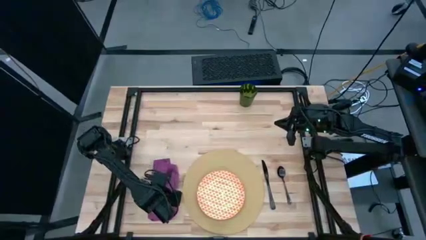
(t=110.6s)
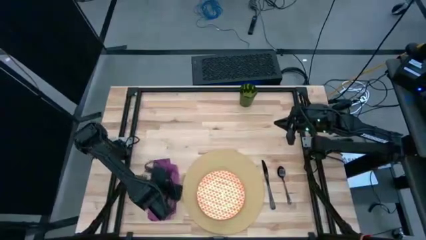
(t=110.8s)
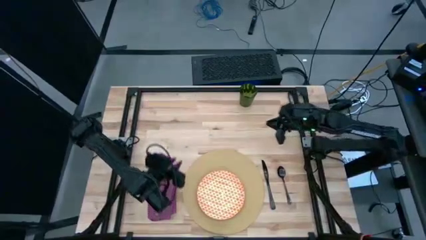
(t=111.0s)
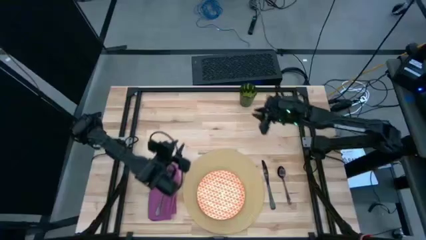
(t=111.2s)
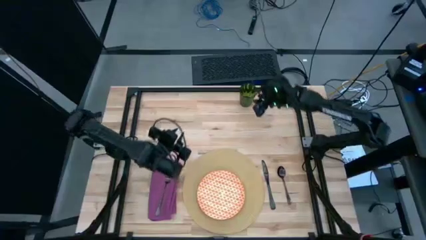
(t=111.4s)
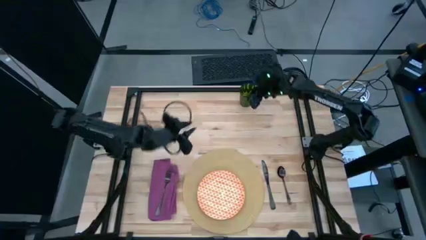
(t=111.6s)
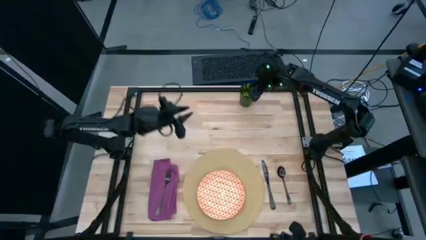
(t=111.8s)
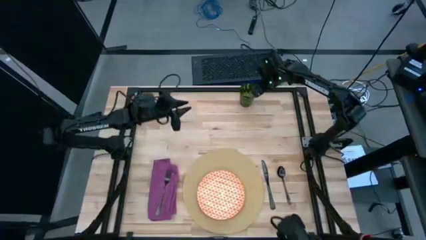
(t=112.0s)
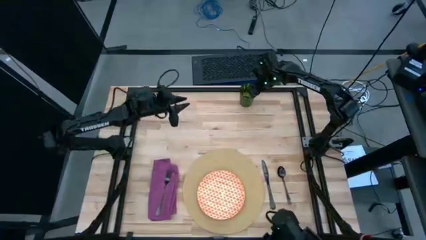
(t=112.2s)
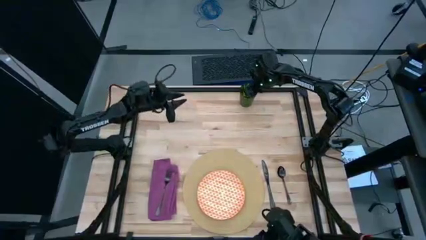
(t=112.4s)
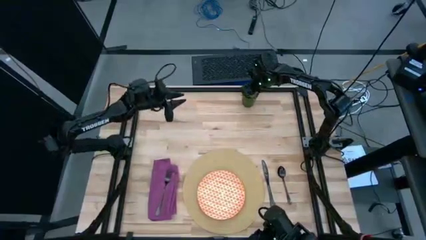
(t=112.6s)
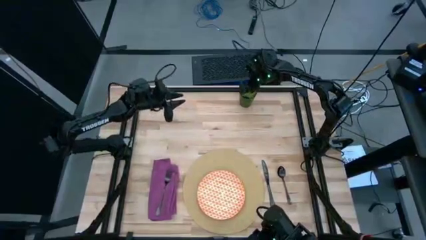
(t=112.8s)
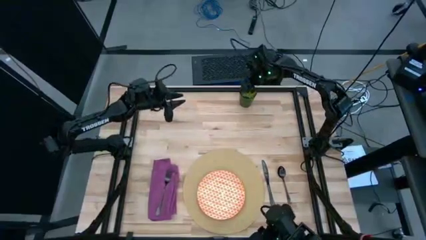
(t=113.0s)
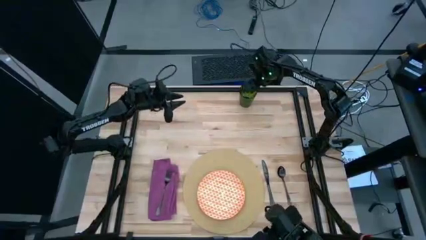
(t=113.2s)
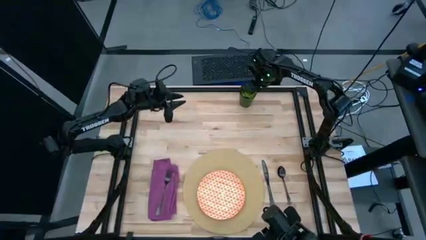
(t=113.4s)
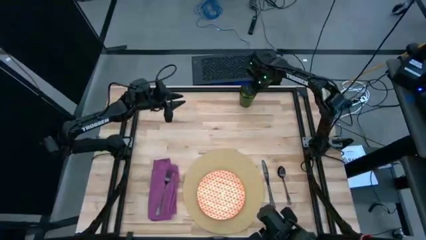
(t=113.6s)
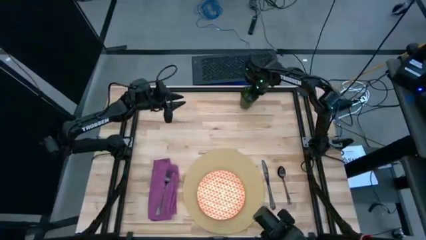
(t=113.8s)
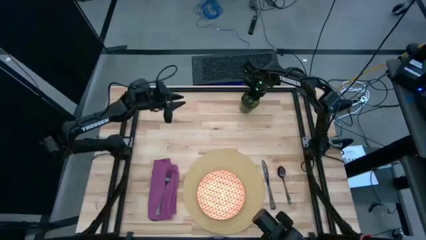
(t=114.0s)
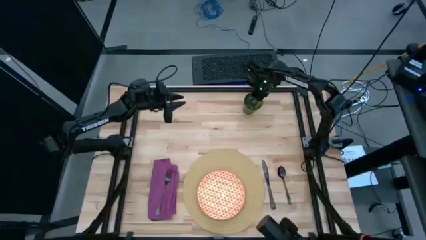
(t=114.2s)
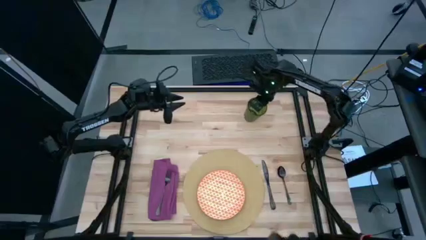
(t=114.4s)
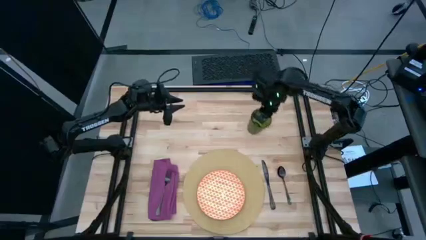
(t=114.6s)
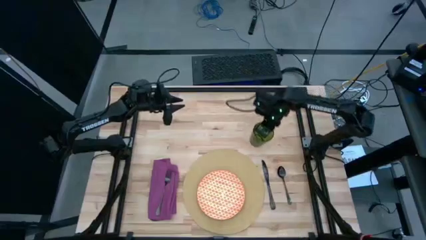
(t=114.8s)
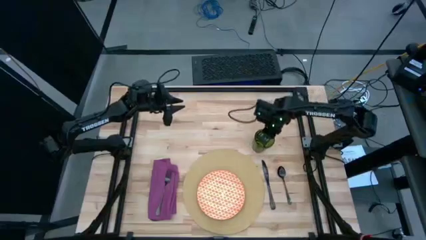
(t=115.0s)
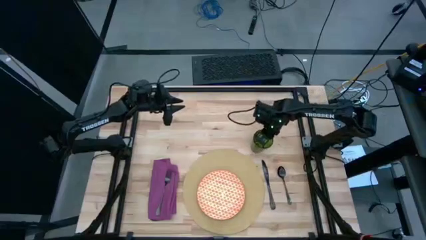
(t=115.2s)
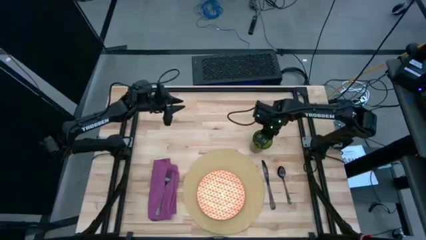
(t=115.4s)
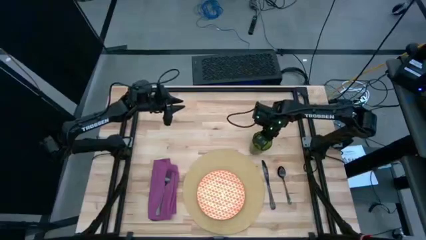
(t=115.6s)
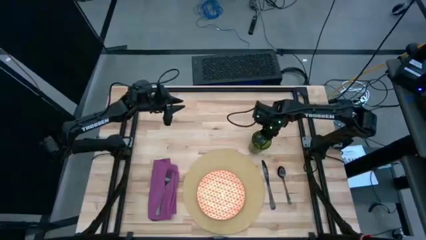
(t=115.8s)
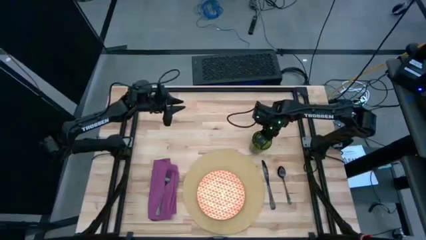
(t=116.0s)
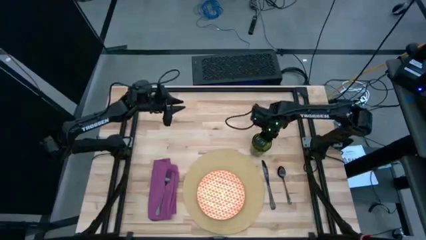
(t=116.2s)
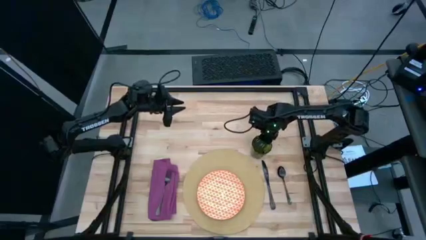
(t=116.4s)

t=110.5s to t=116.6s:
Task: Set table place
Move the green cup to the top right of the brown table mat

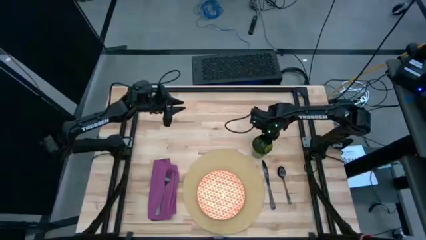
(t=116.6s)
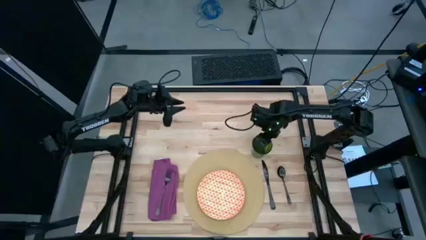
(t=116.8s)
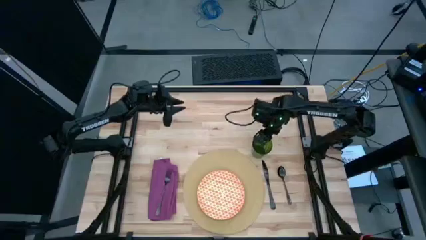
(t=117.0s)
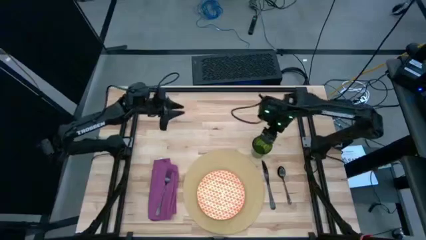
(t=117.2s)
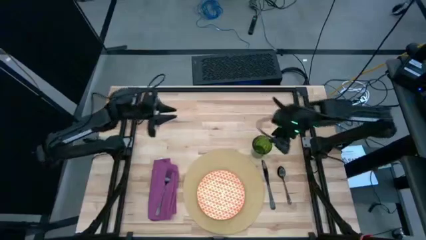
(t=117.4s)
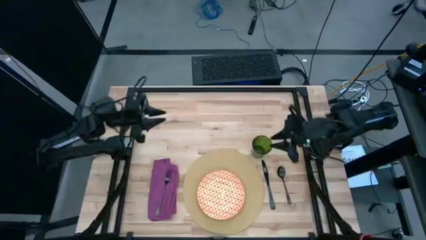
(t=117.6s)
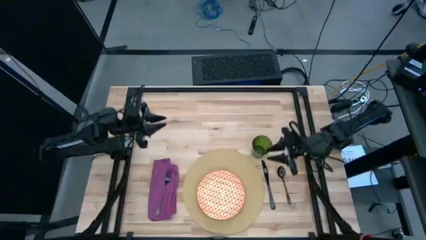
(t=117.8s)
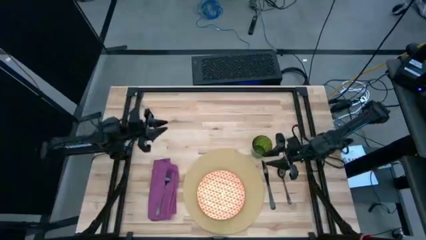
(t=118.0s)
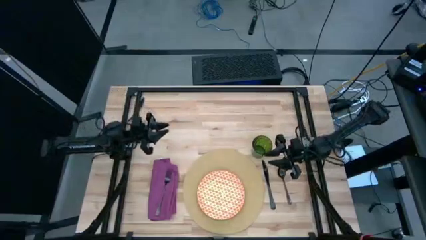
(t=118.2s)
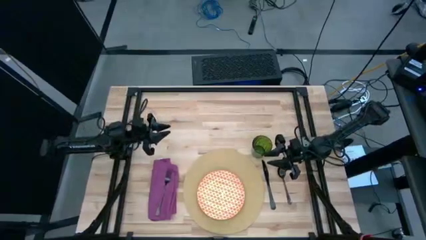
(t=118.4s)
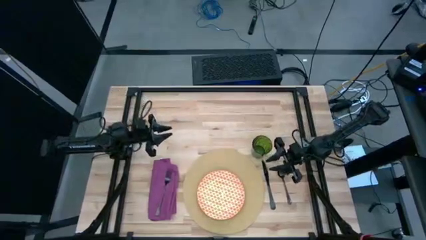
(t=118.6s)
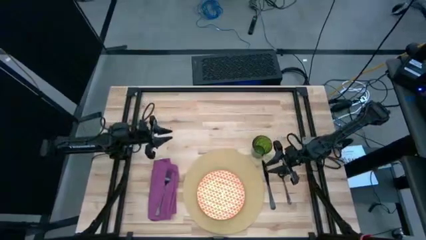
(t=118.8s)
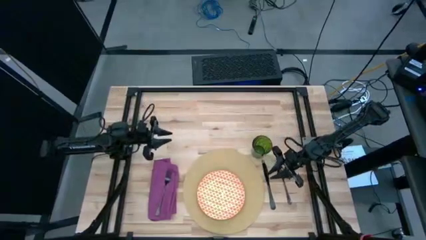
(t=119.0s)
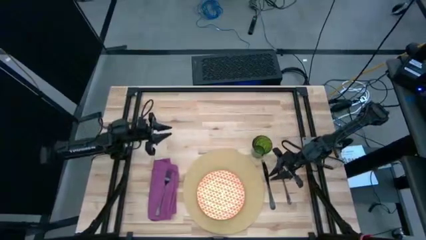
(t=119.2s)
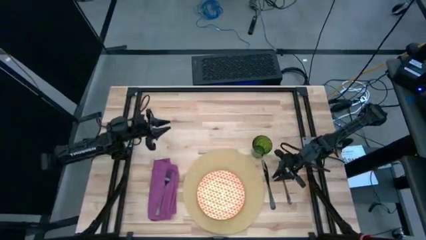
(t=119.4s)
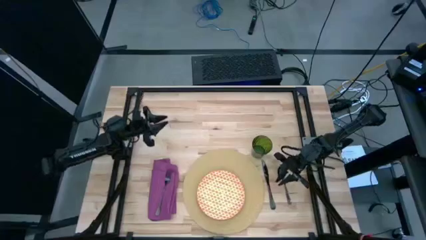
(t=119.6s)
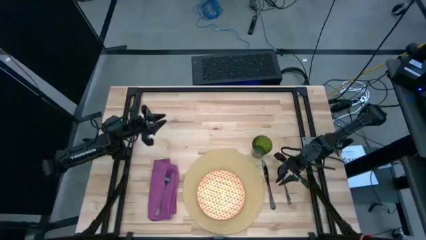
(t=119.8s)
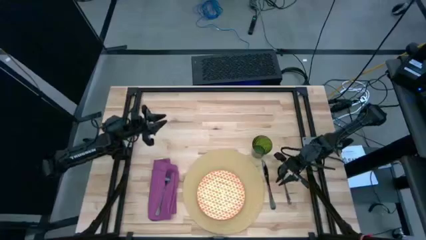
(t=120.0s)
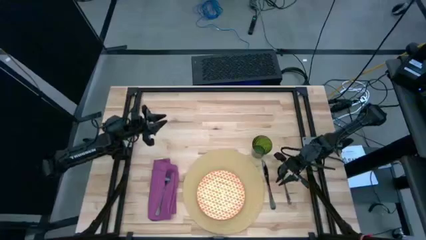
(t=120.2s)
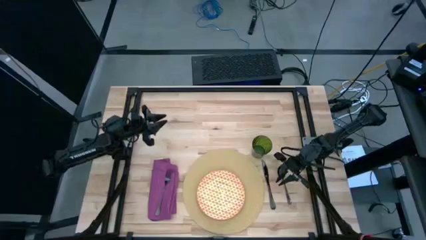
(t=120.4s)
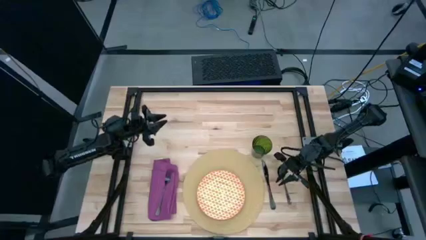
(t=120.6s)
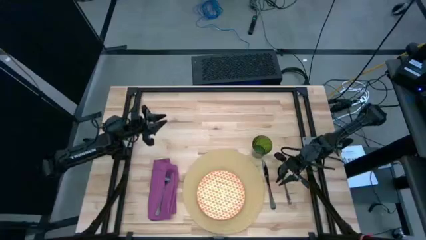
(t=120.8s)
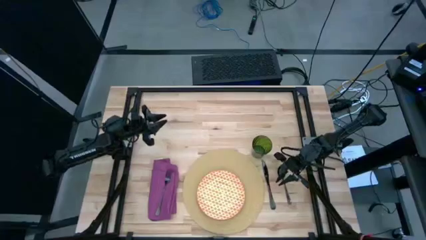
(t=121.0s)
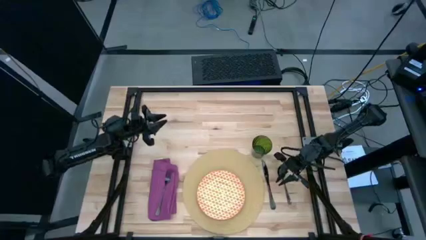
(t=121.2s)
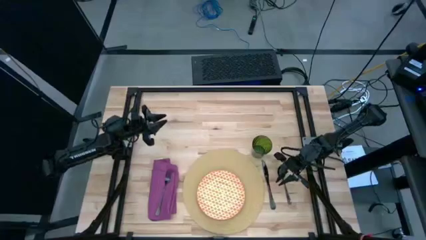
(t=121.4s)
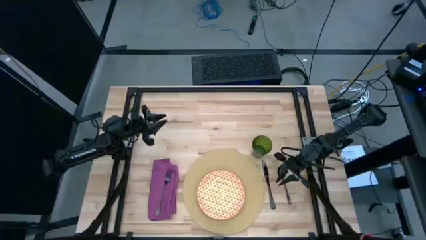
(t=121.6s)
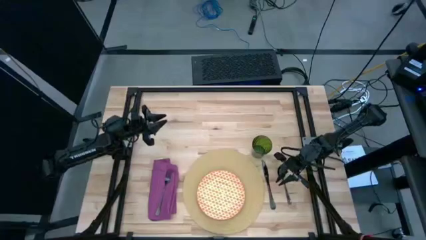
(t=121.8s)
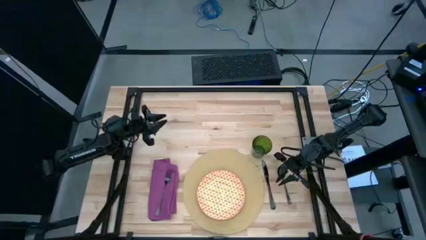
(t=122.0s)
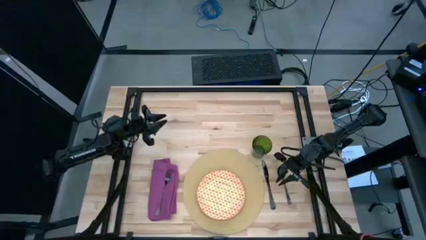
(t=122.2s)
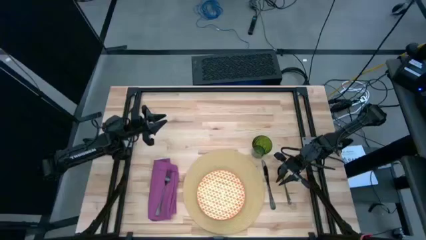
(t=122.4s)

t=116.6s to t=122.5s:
Return to Home Position

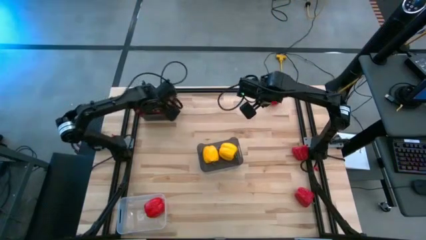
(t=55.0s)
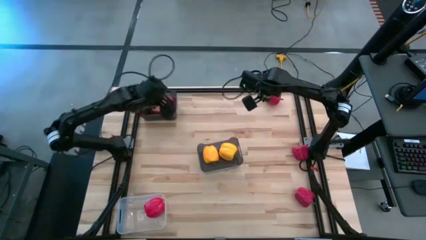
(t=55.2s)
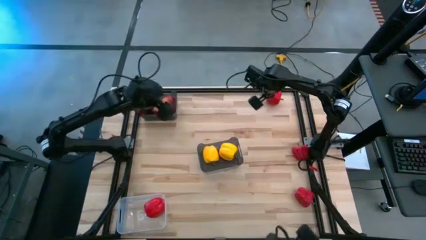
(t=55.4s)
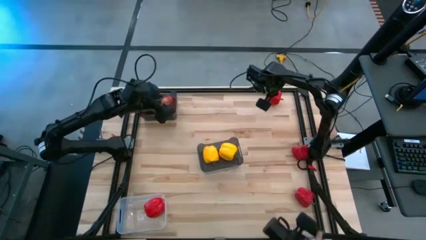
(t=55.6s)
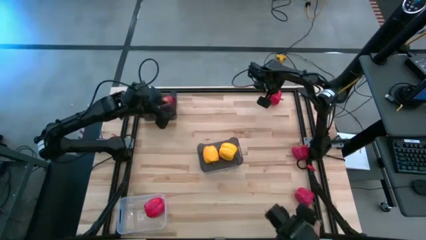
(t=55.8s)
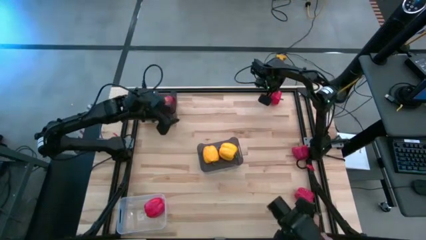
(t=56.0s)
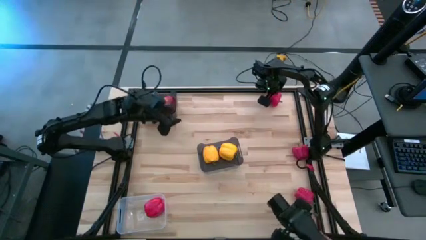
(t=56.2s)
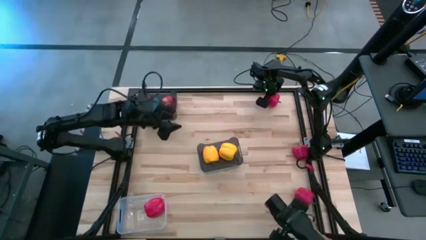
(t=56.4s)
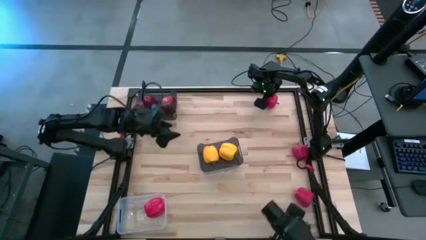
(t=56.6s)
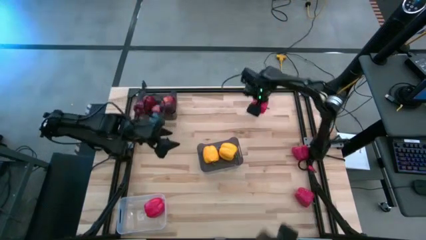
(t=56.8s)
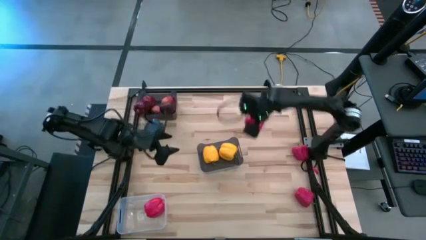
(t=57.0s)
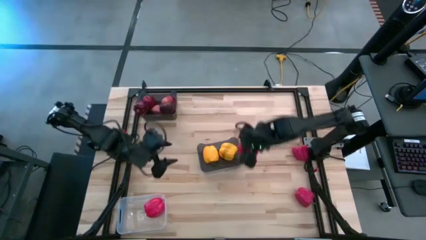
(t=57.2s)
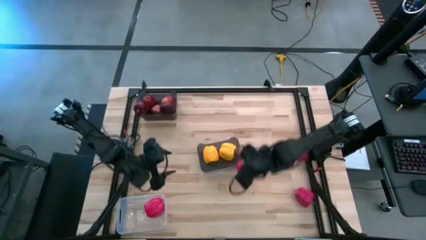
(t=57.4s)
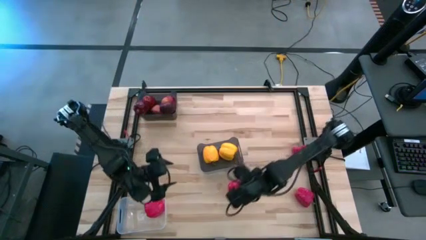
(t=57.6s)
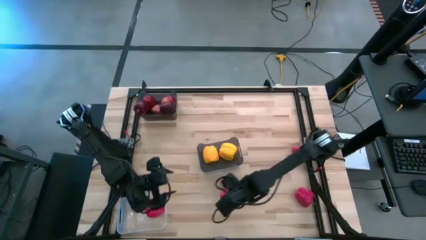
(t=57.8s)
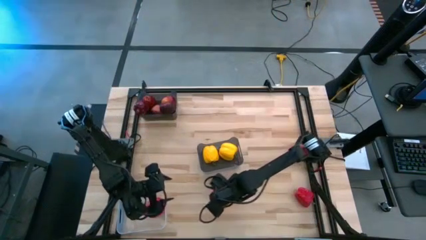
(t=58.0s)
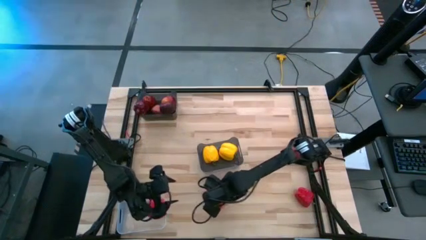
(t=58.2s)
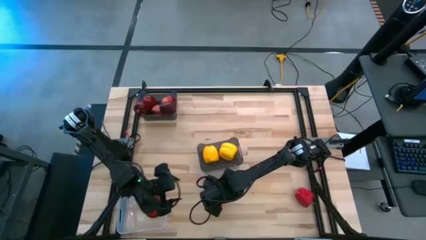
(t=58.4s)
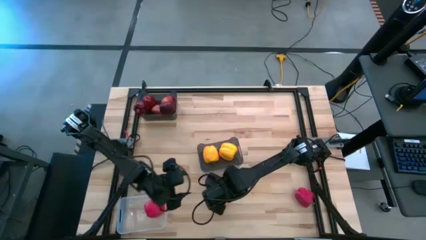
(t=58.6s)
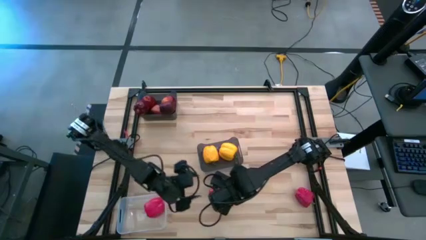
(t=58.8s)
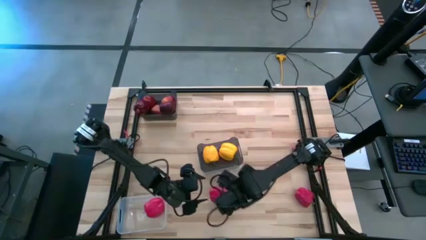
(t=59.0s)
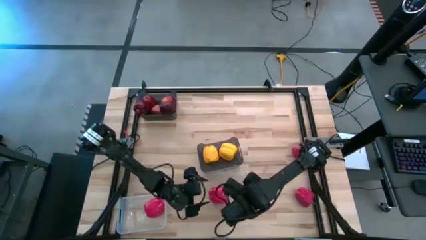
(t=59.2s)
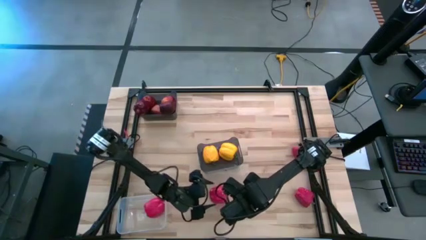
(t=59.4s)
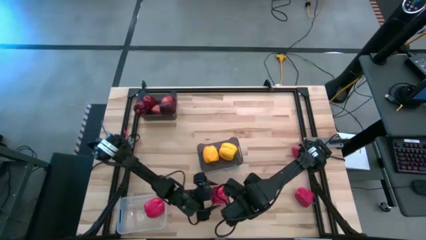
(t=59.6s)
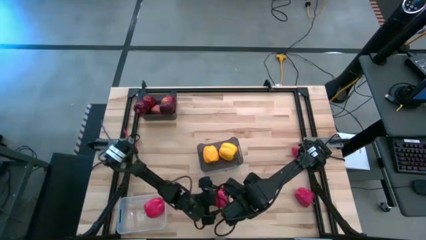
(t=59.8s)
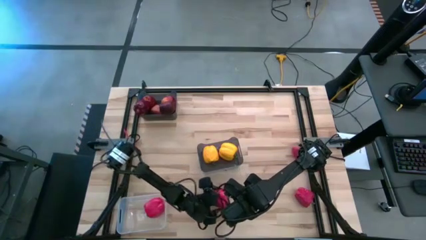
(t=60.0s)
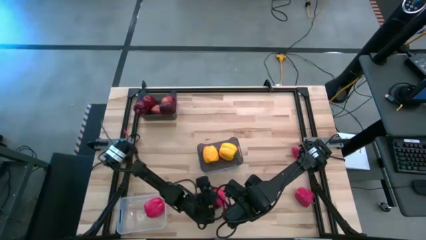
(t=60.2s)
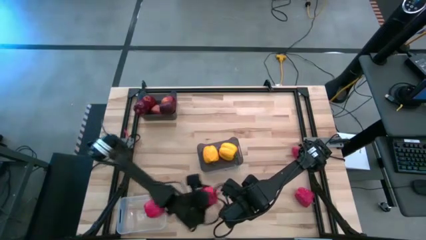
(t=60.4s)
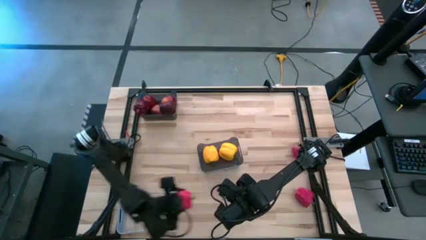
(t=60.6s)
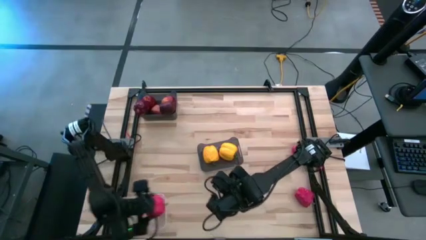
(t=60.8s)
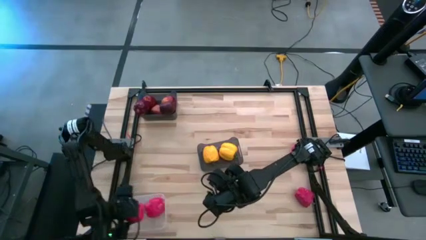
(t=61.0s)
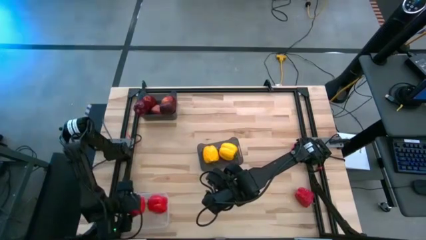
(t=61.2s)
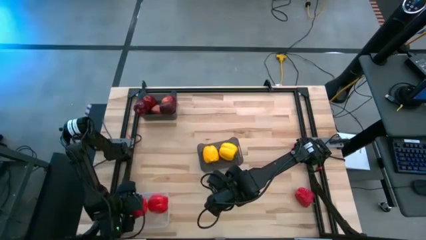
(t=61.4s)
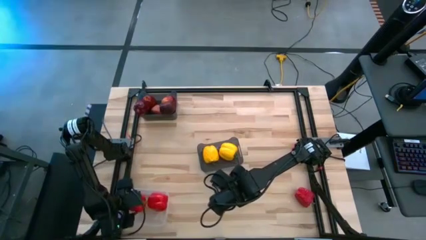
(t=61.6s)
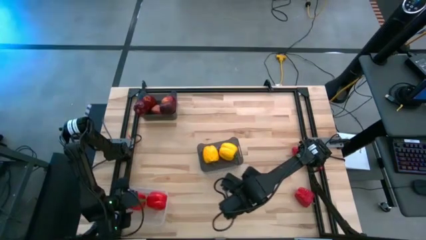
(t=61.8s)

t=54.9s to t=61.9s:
Task: Sort produce into baskets
Put the top red bell pepper into the transparent bin
